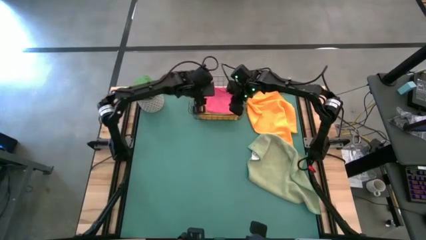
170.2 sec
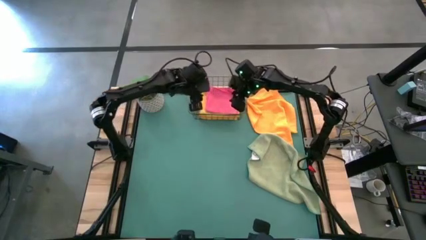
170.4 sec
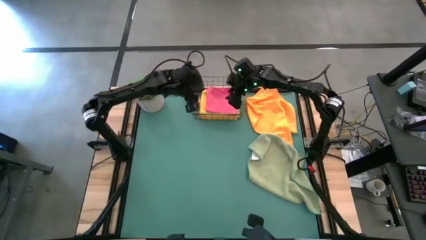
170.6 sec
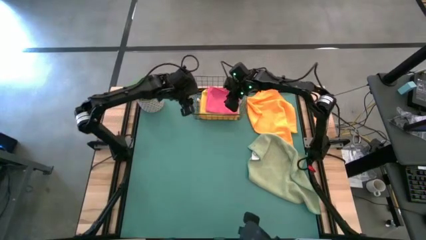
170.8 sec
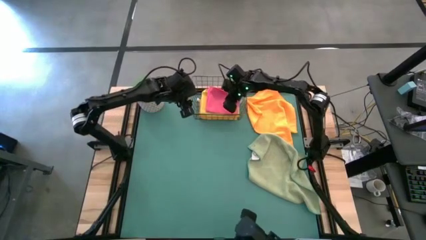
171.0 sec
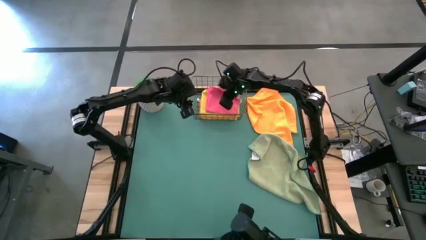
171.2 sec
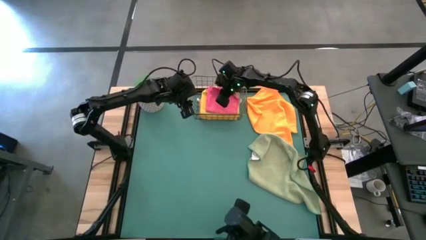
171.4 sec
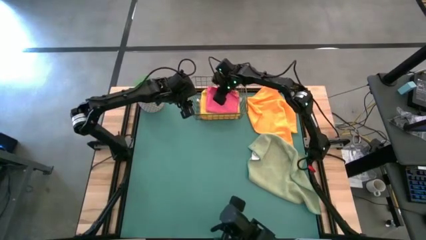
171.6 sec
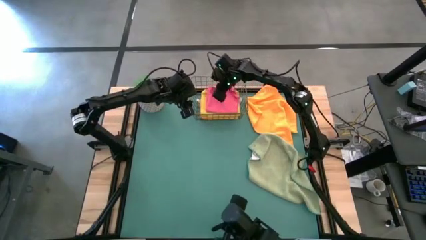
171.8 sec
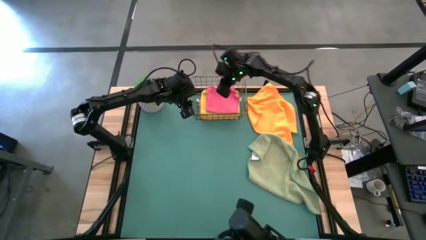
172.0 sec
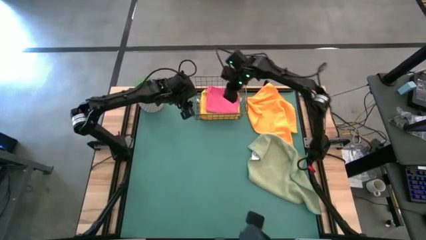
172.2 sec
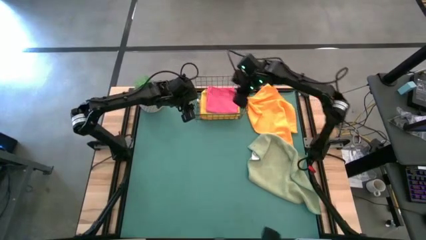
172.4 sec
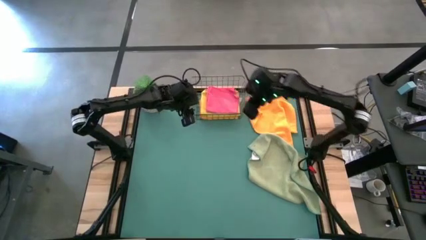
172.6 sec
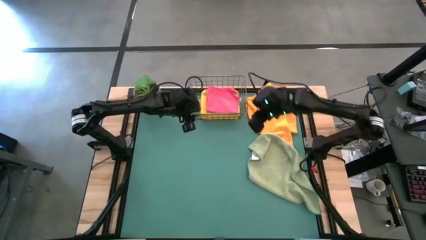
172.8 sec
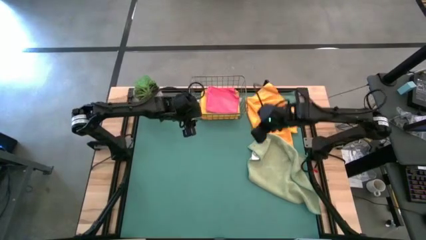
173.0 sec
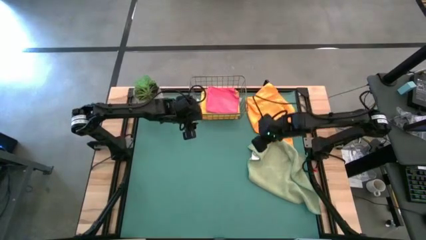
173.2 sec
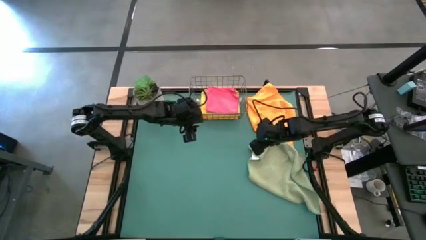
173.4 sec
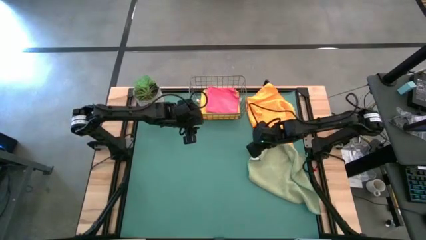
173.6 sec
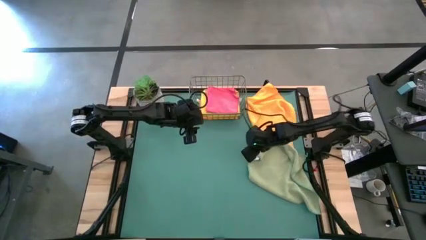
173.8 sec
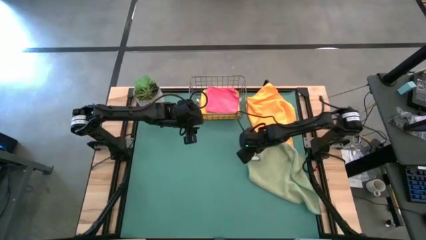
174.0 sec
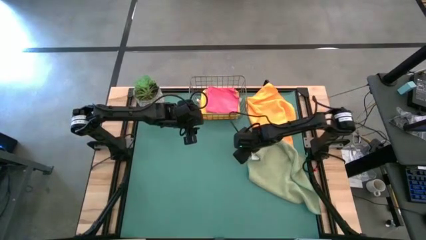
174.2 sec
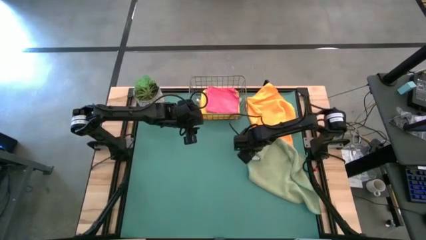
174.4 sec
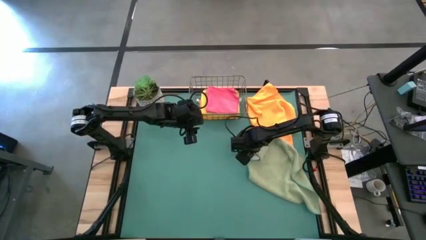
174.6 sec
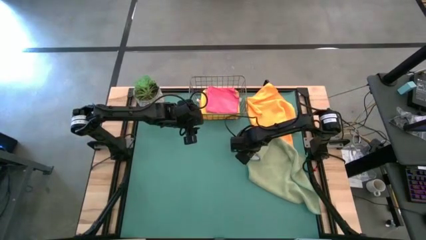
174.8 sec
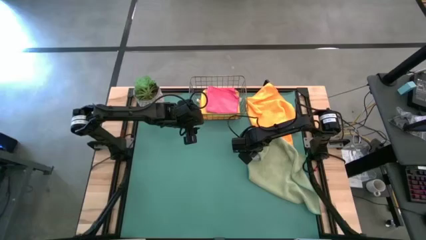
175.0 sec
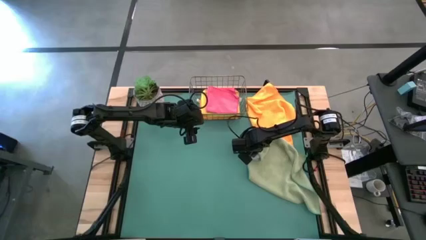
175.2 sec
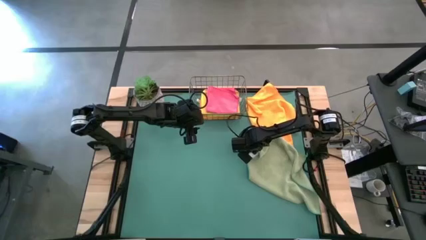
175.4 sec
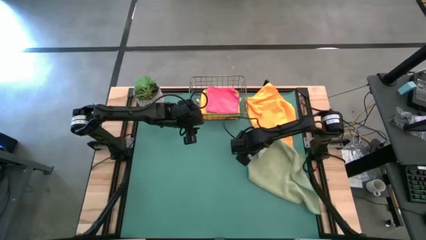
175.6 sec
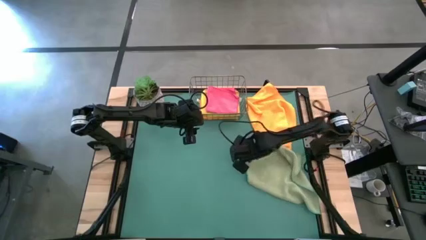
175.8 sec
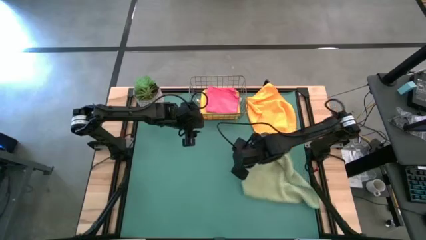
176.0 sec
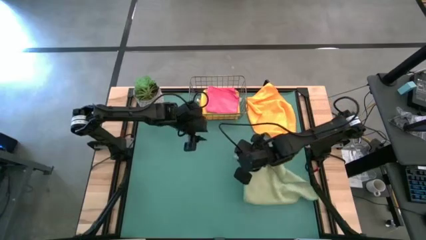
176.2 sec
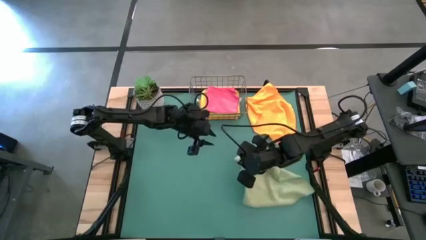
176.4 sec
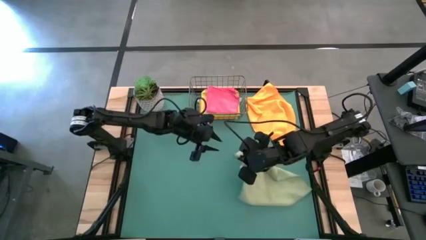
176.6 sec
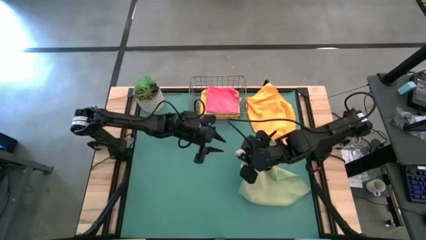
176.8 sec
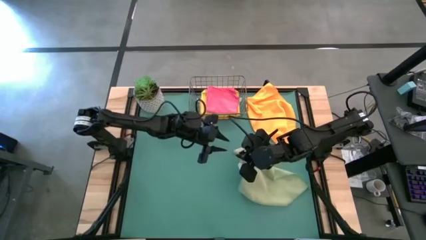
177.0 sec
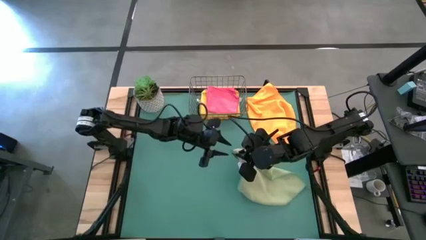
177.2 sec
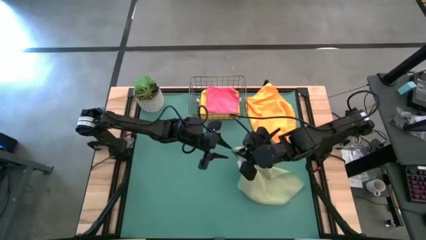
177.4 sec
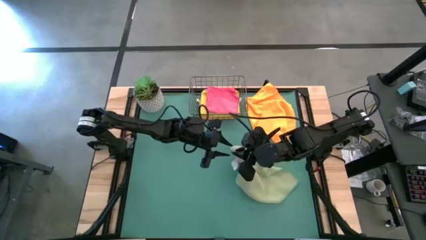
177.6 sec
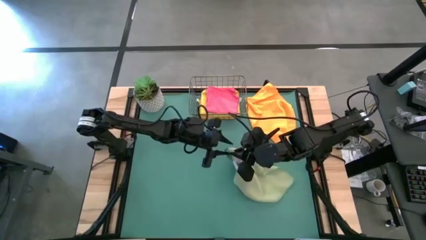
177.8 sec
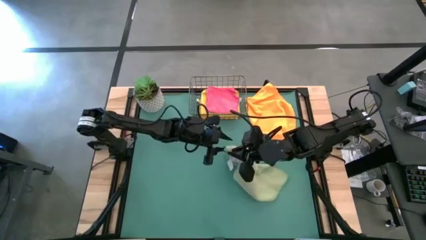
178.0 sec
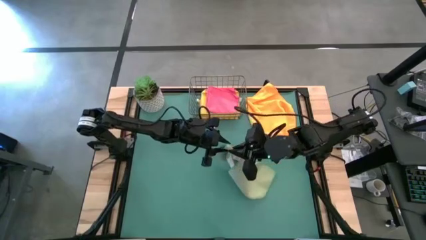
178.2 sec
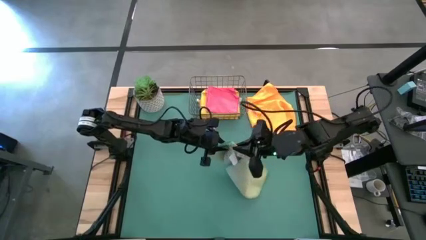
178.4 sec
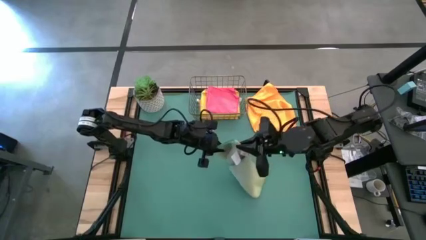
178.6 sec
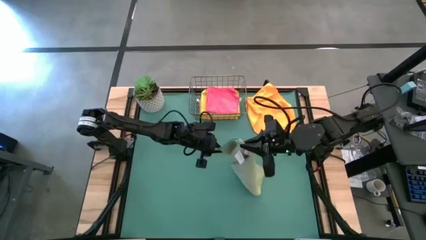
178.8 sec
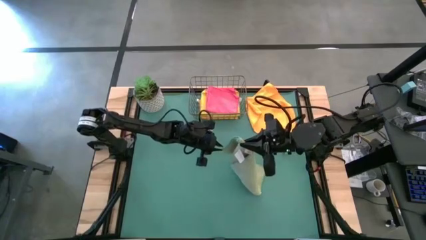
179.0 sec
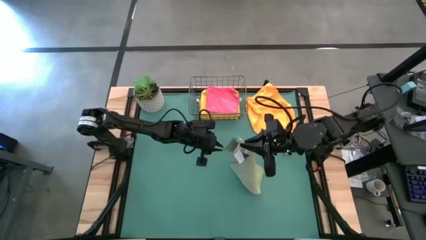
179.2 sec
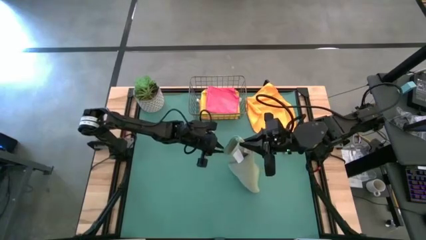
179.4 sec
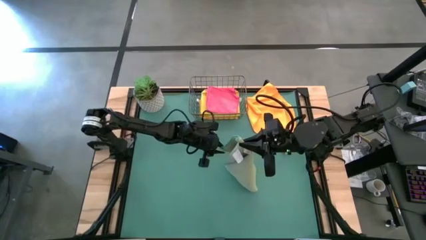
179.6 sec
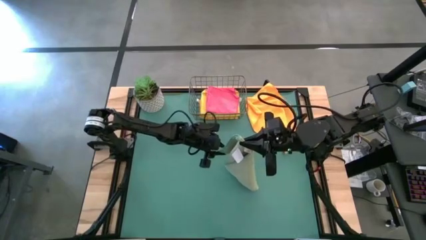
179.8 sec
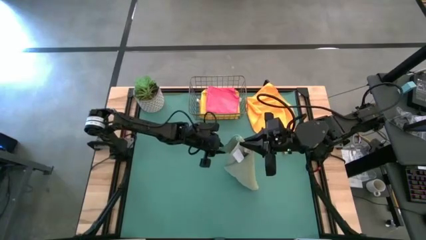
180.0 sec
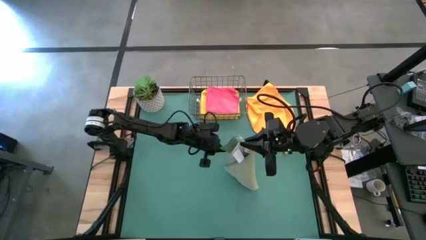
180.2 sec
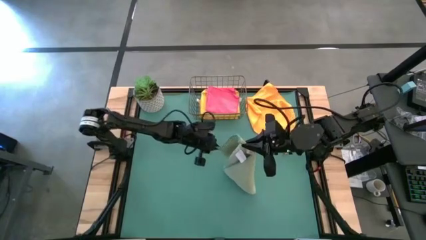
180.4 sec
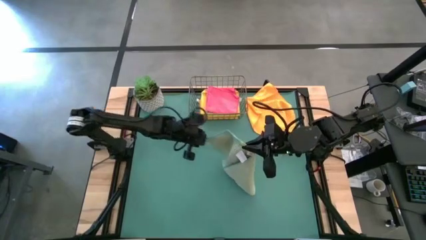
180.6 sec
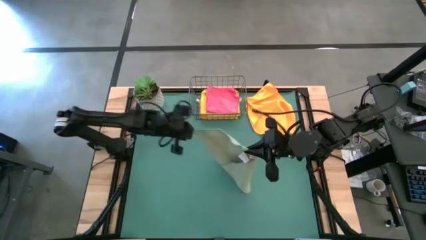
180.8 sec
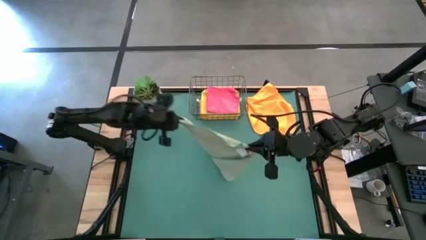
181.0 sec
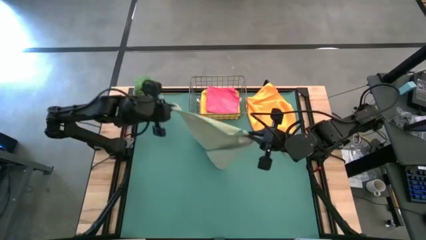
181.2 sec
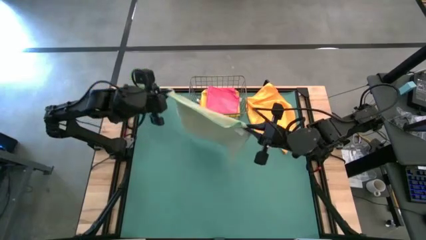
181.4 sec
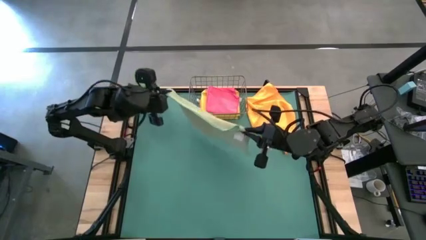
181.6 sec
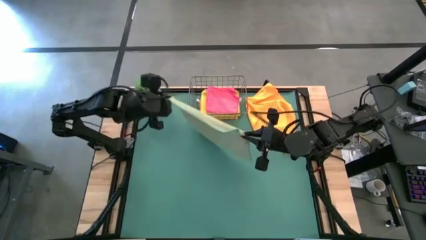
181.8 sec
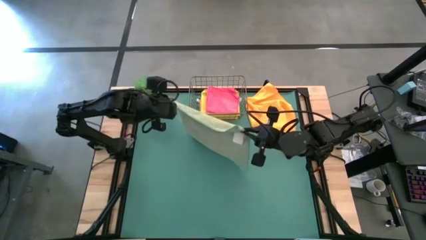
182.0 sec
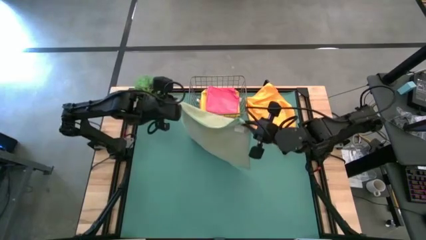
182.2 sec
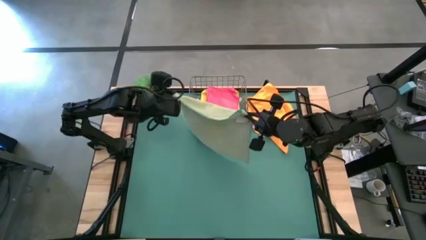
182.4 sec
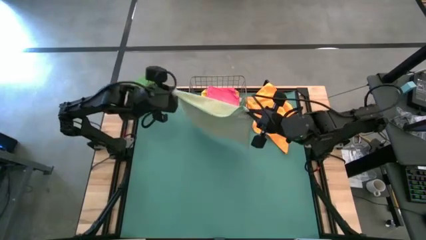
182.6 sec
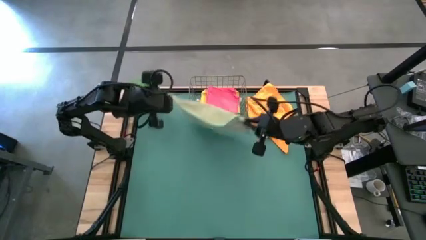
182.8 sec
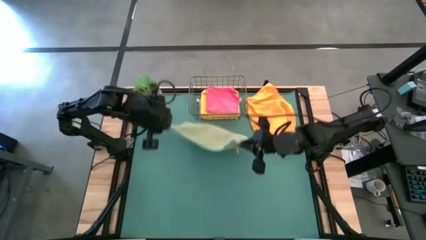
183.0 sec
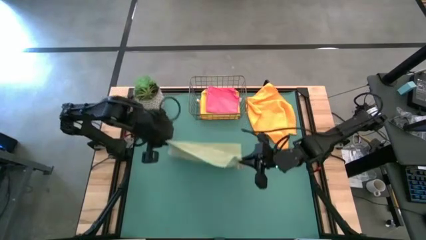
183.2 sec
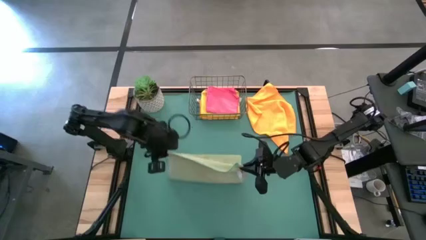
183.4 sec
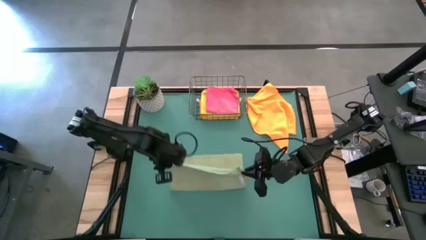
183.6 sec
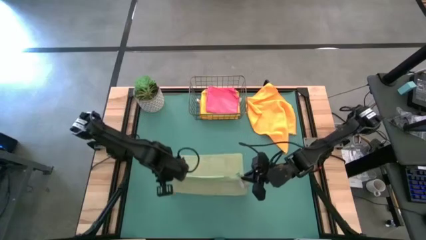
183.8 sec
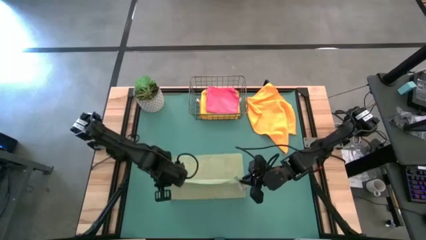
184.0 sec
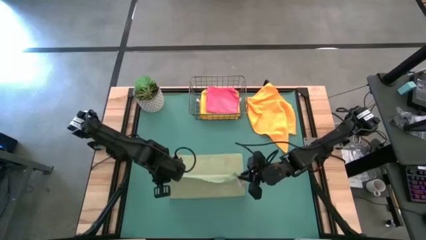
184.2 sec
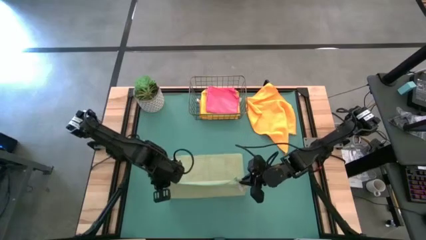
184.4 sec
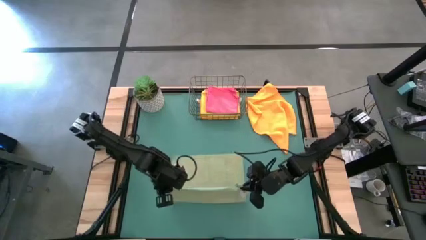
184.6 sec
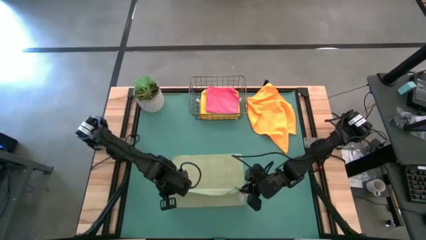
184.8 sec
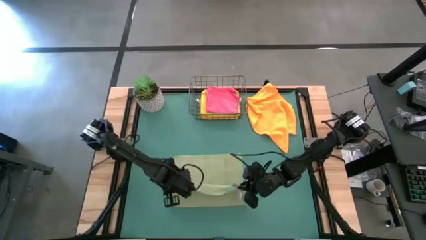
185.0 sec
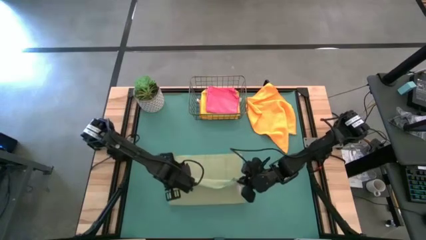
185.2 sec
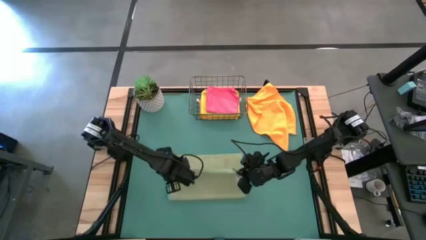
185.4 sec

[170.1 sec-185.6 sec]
Task: Fold microfiber towels
Fold the green microfiber cloth
